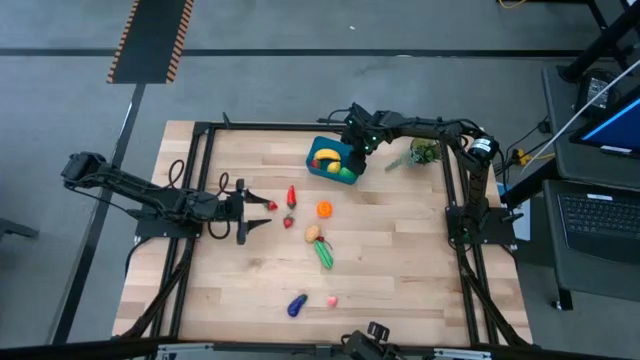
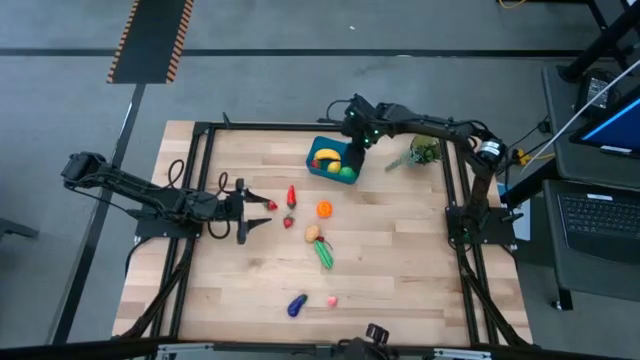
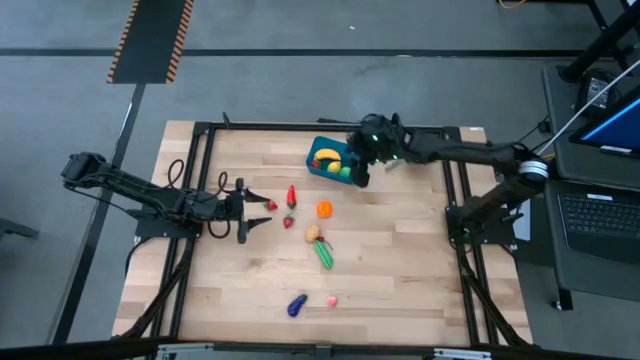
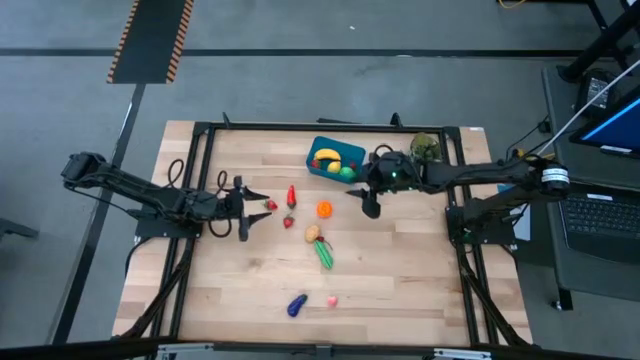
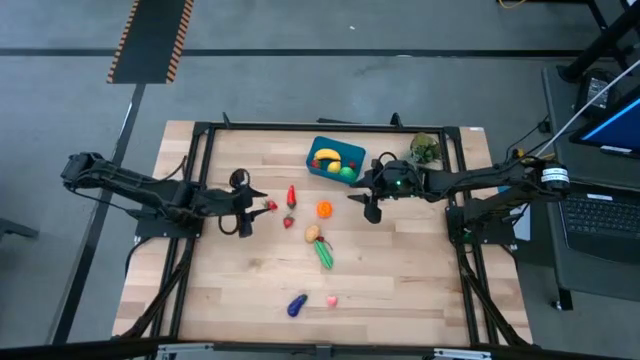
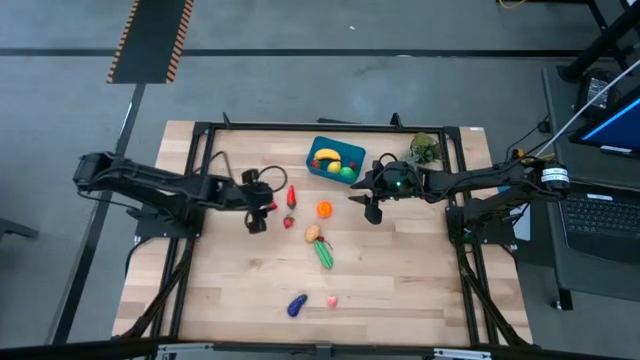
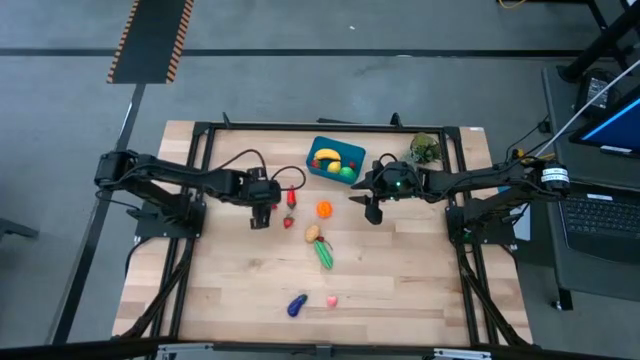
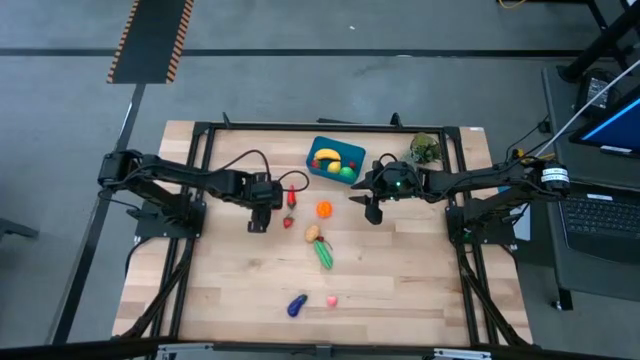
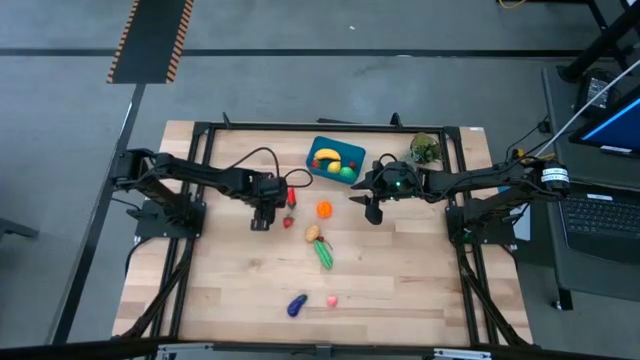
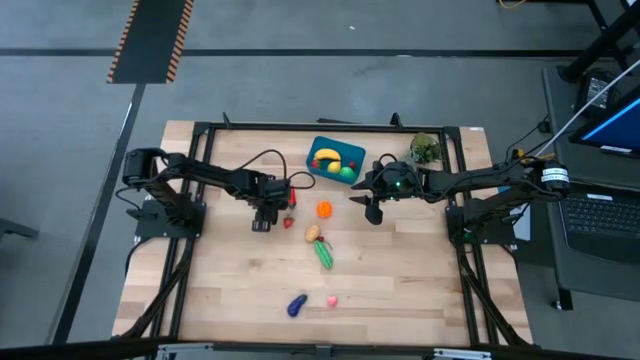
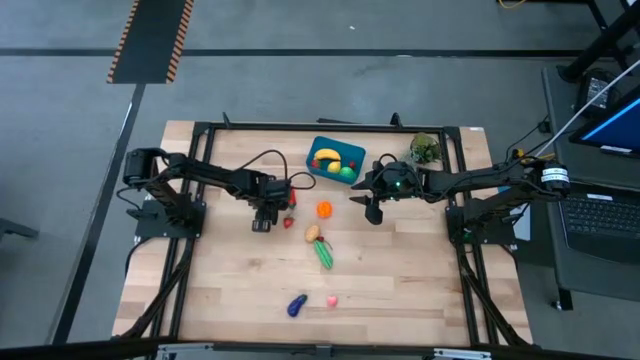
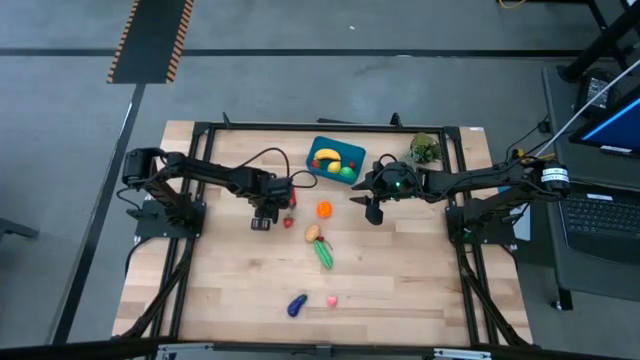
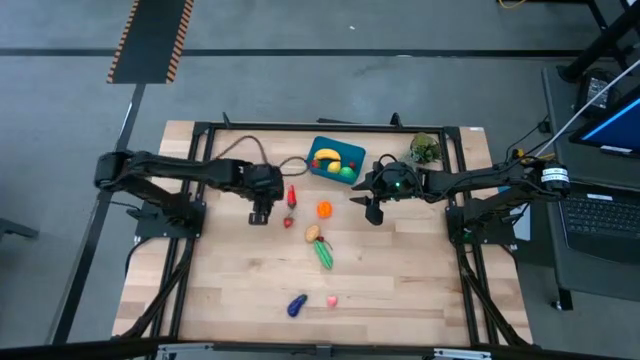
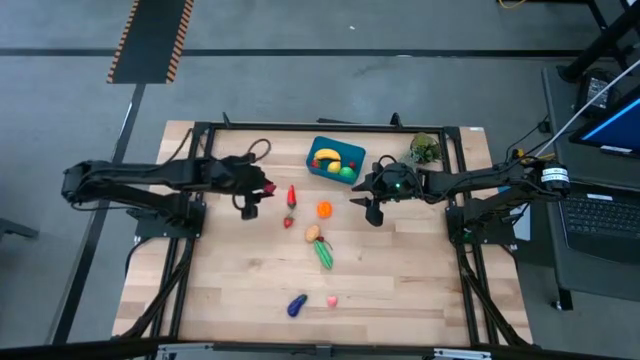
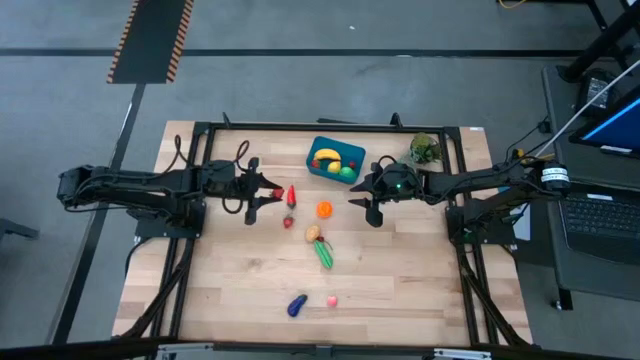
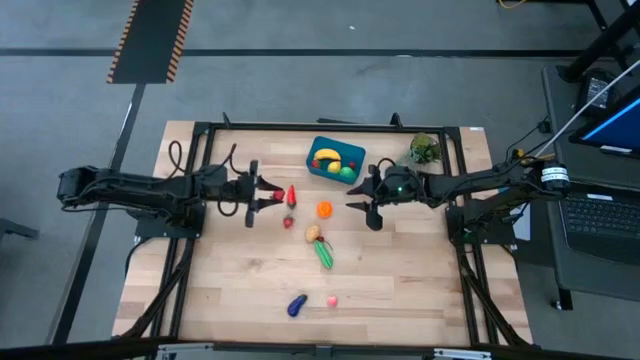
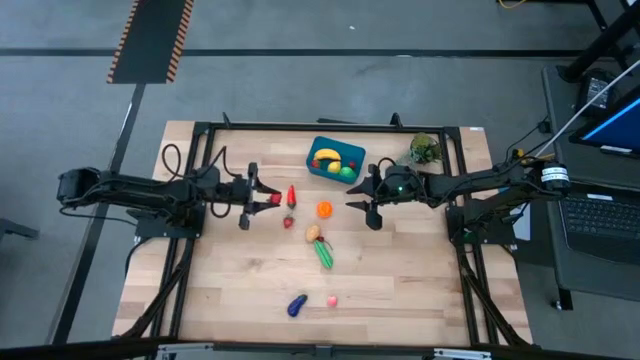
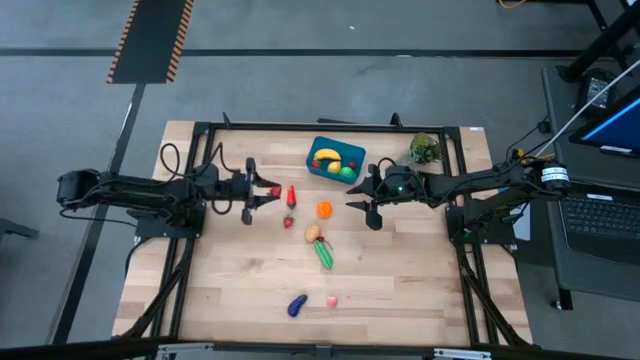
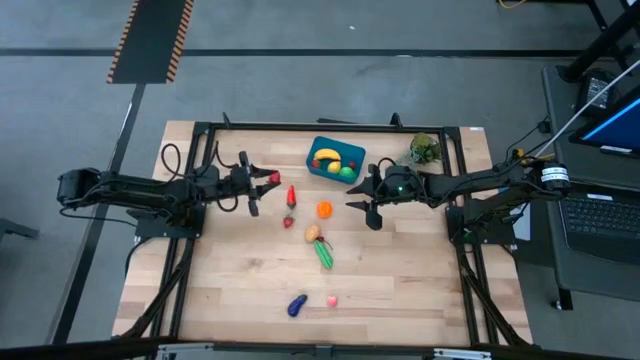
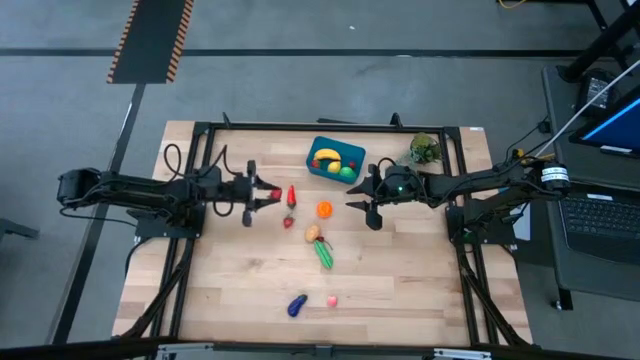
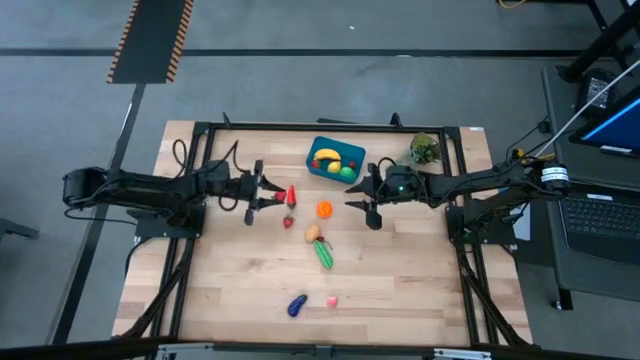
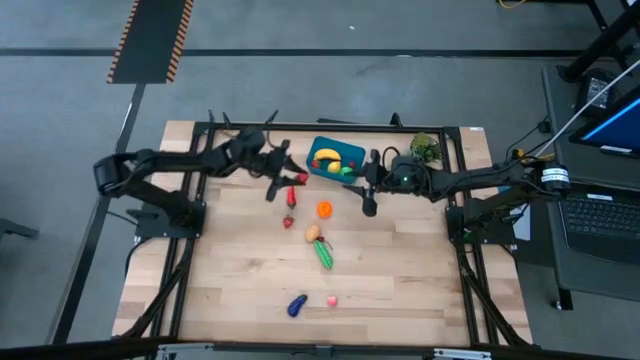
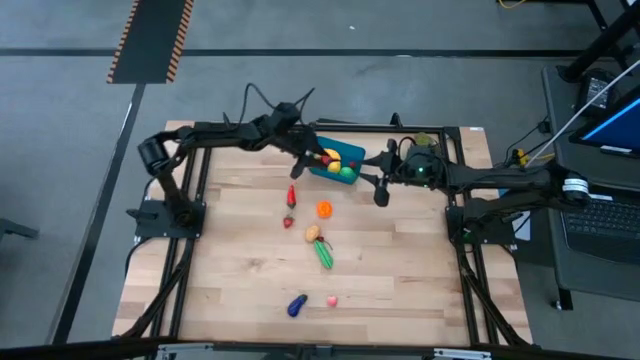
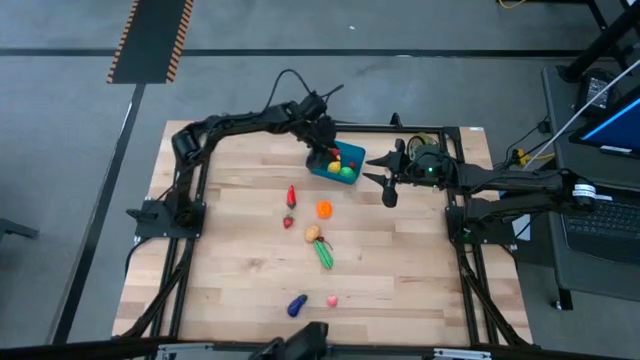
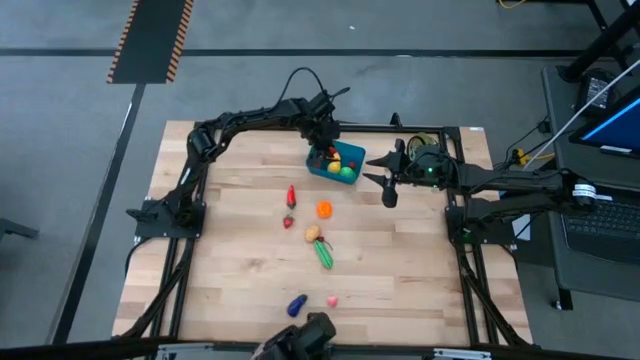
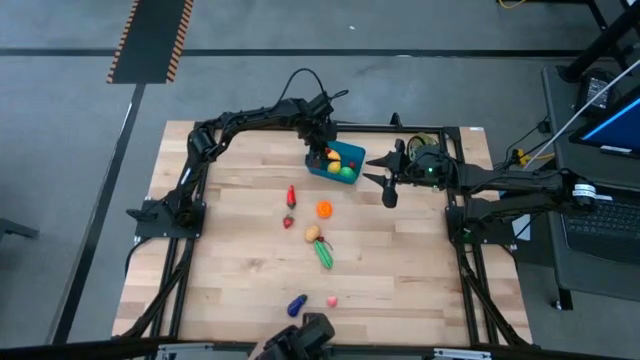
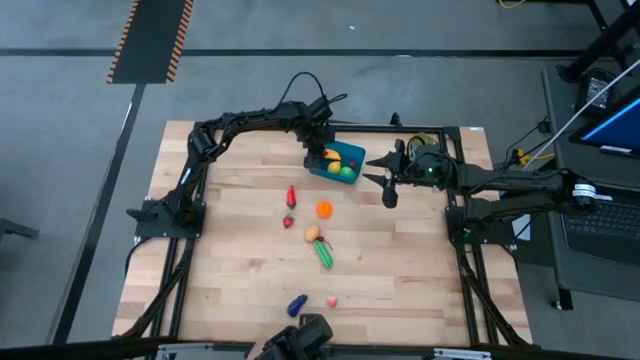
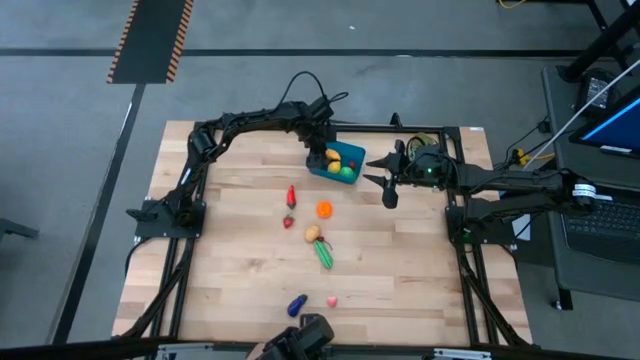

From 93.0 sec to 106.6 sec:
Task: Pick and placing Produce into tupperware
Put the top red strawberry into the blue bin
